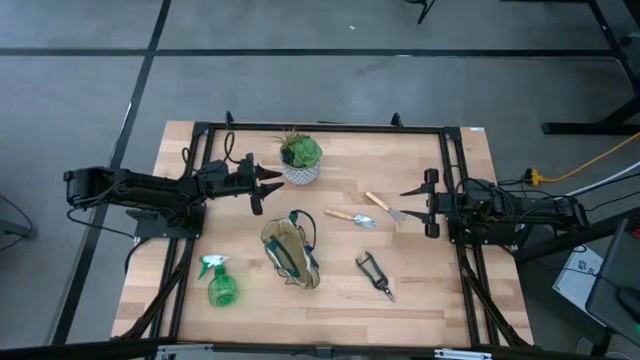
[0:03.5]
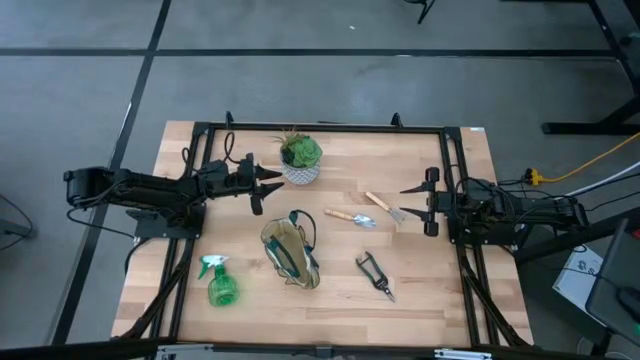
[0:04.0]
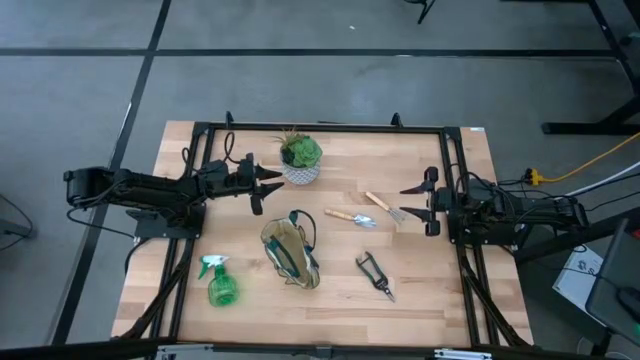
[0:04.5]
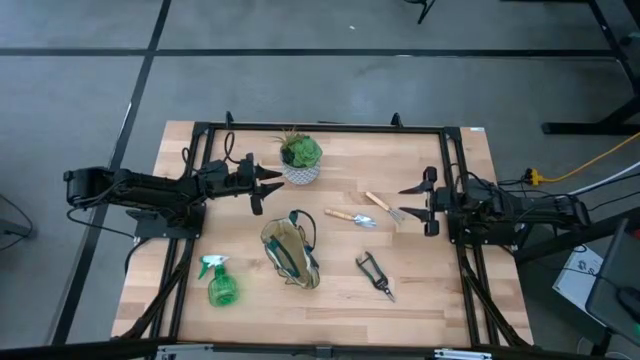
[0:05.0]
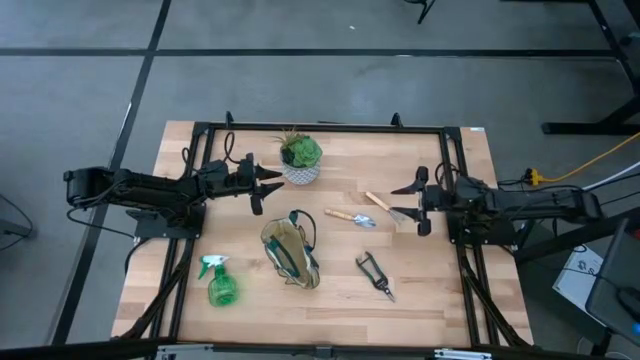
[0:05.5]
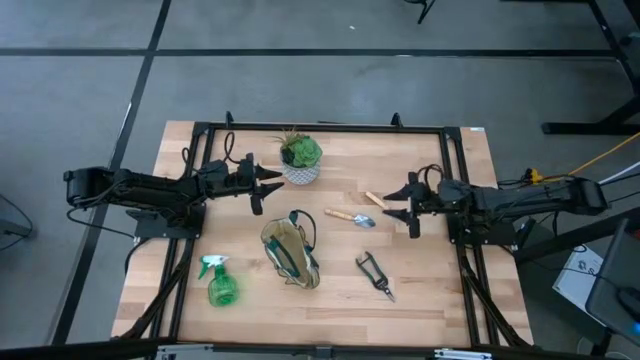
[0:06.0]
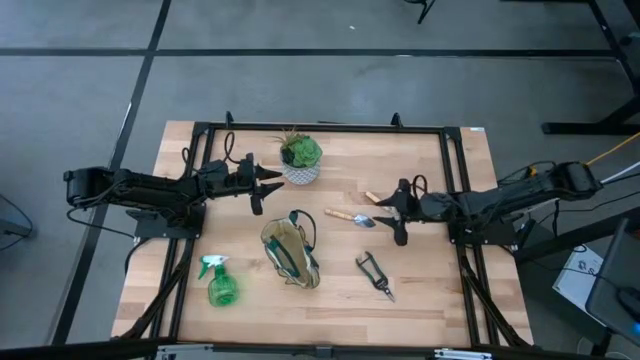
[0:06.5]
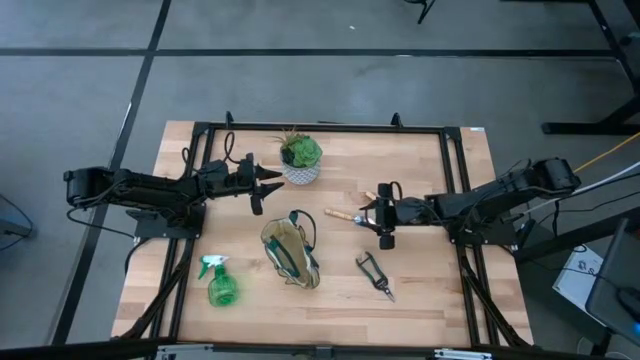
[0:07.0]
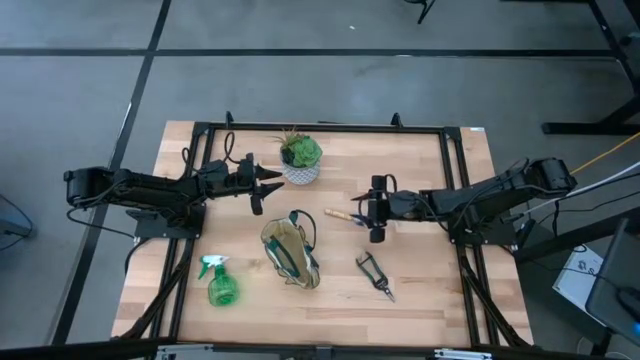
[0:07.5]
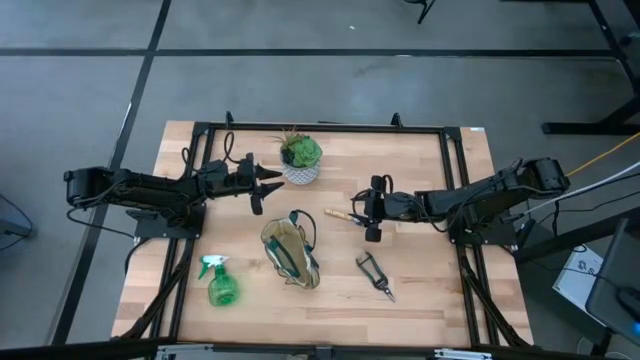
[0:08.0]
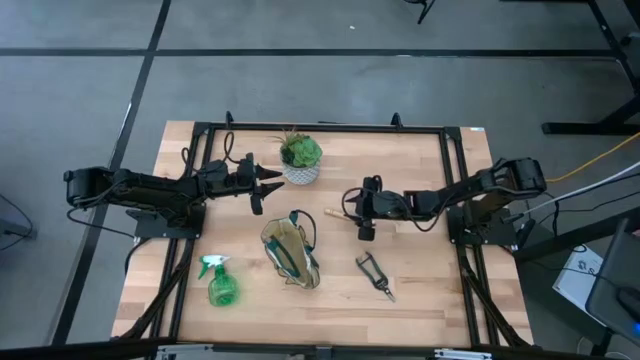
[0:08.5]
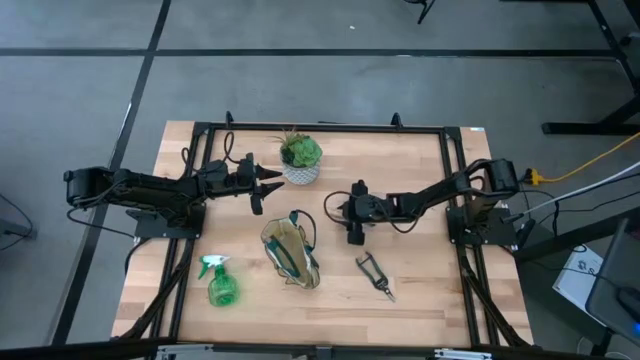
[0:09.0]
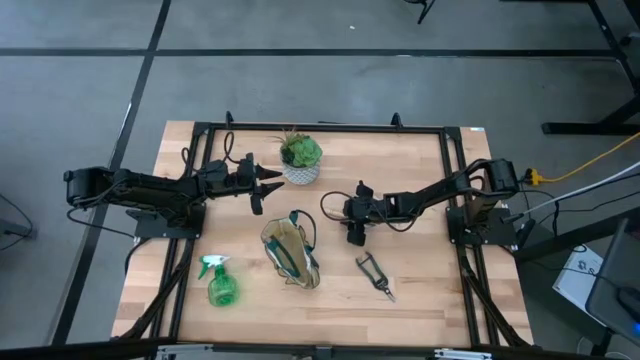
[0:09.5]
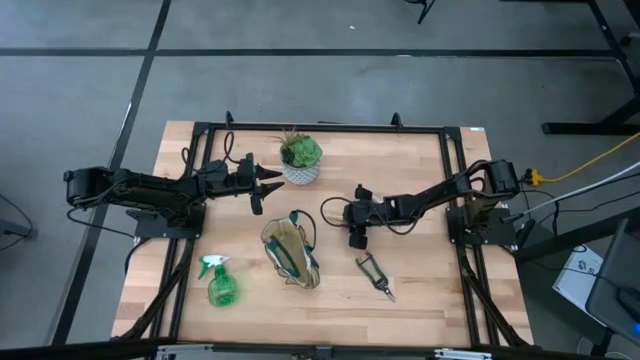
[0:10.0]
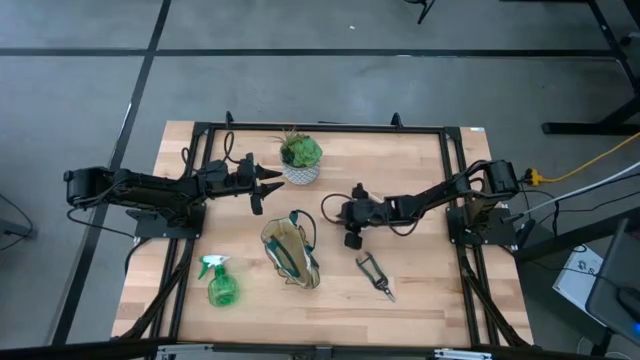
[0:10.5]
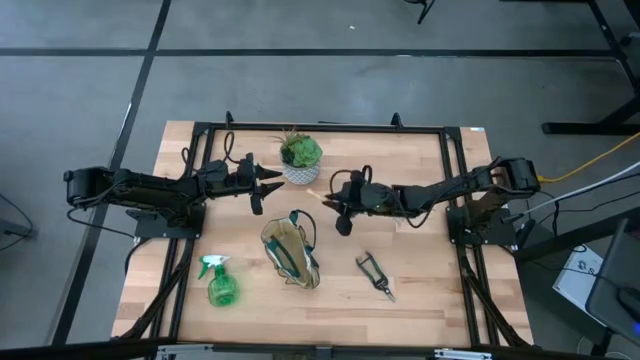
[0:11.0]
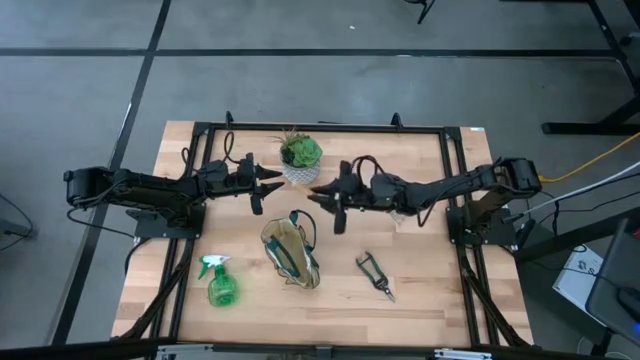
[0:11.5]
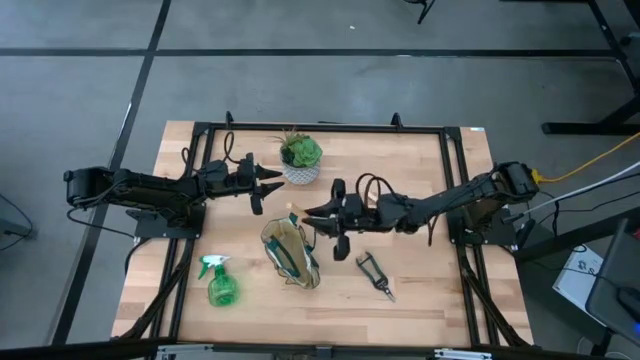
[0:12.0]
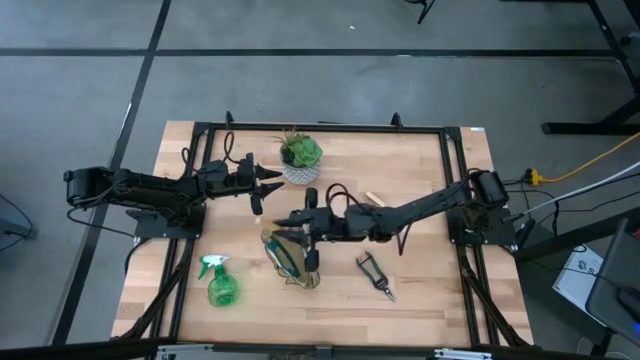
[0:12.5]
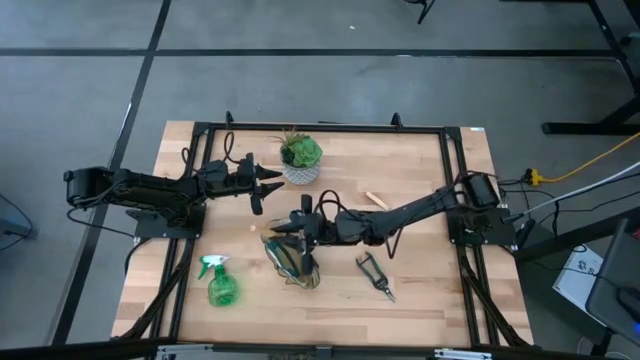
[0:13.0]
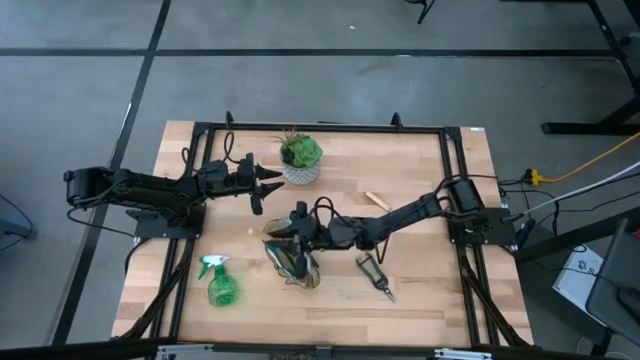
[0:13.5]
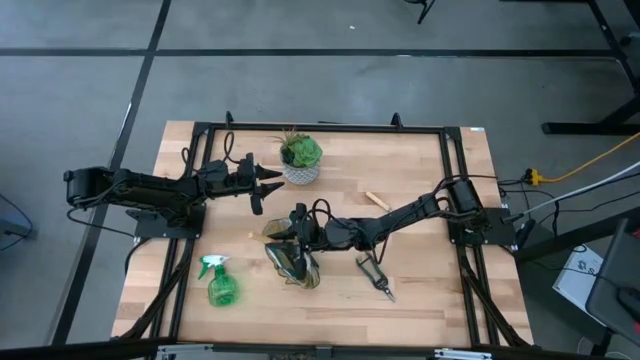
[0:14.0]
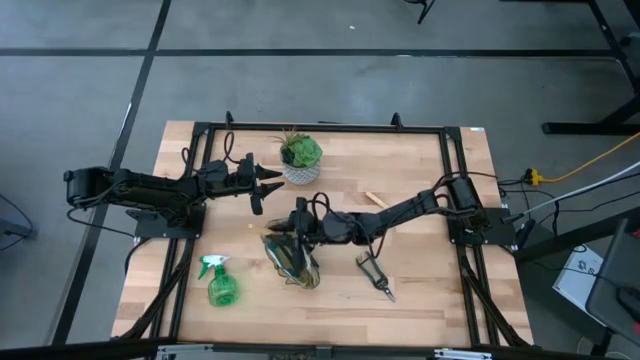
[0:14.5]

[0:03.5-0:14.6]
Task: Pick & Place Garden tools in Gardening bag
Put the trowel into the gardening bag

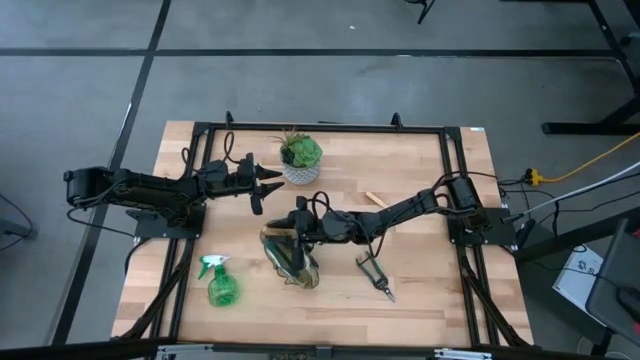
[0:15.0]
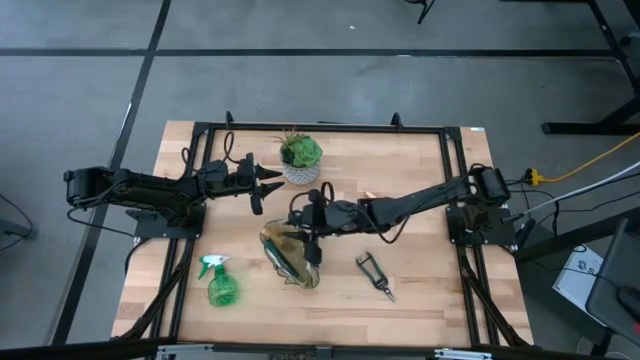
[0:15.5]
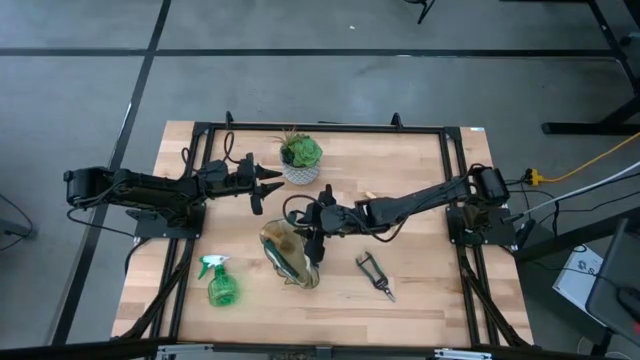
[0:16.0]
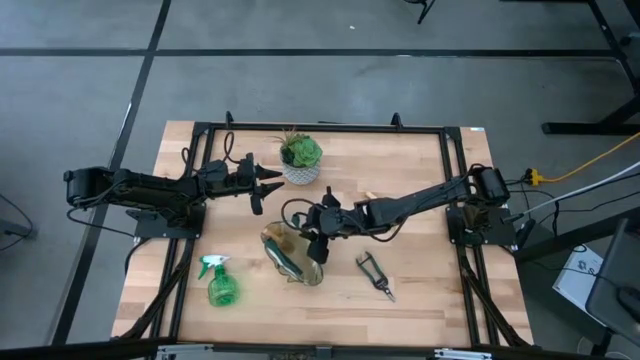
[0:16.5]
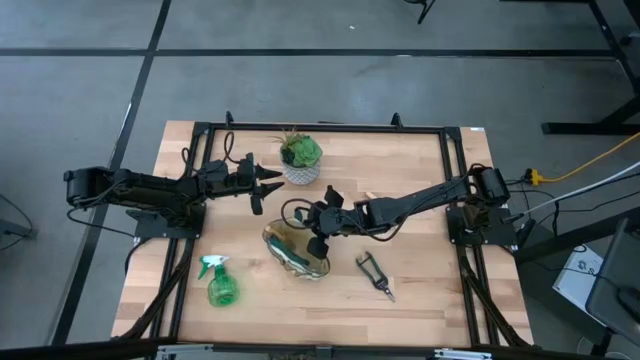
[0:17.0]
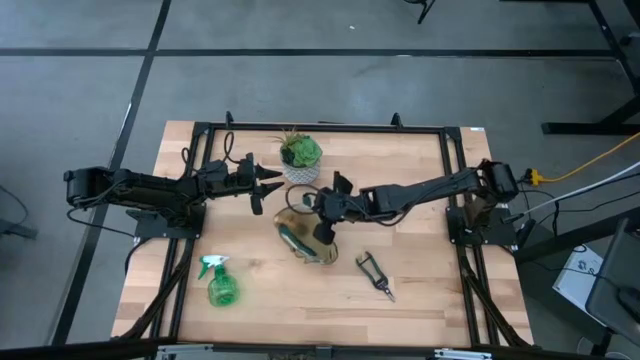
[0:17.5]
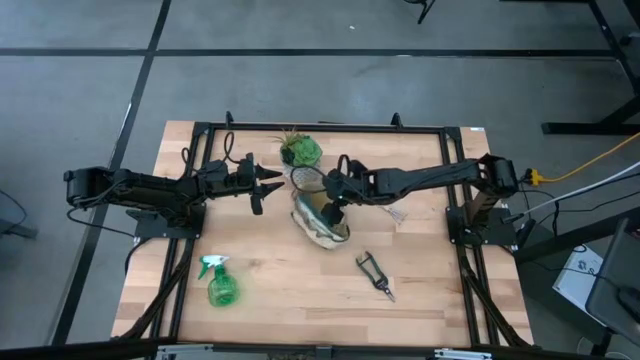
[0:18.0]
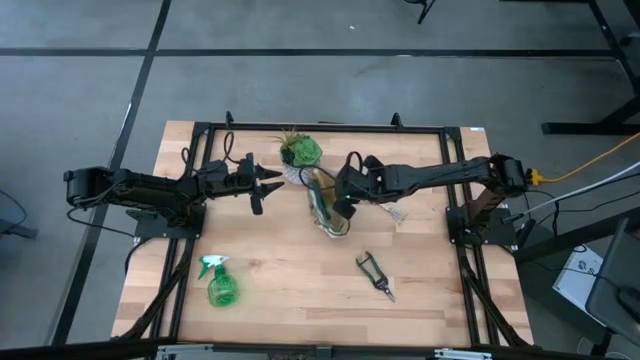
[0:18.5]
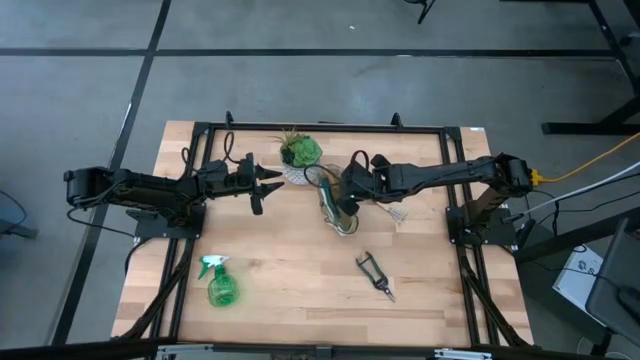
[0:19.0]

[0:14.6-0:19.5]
Move the gardening bag to the center of the table

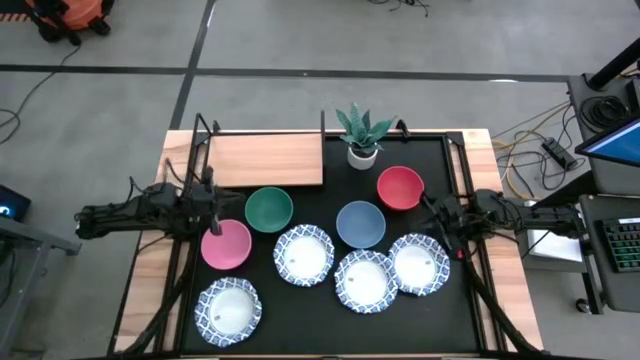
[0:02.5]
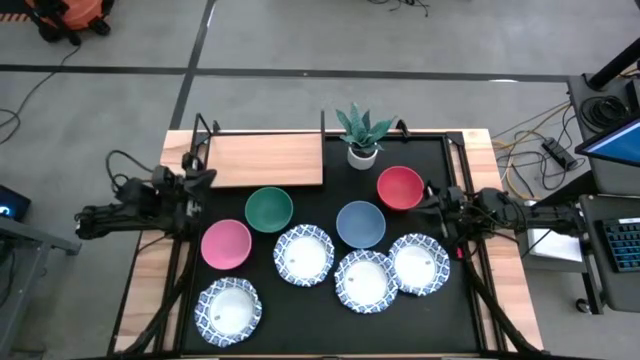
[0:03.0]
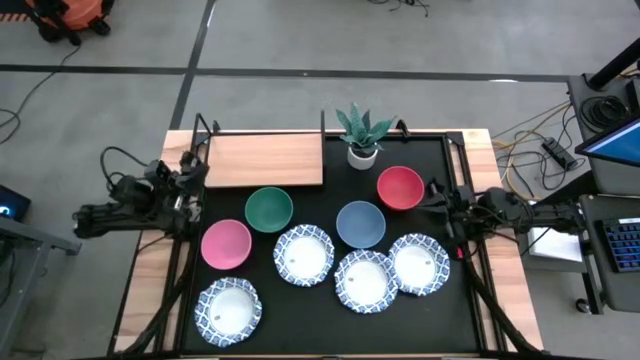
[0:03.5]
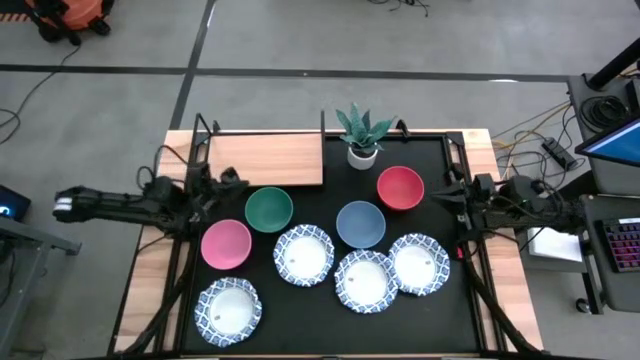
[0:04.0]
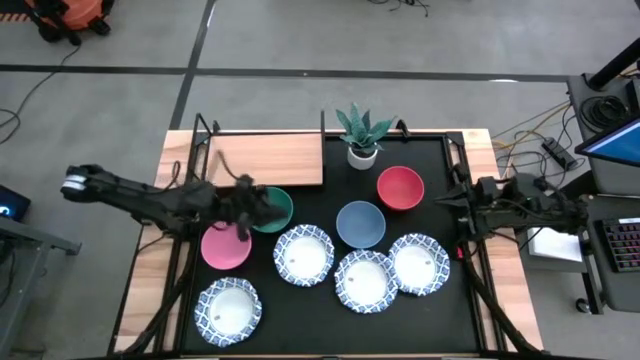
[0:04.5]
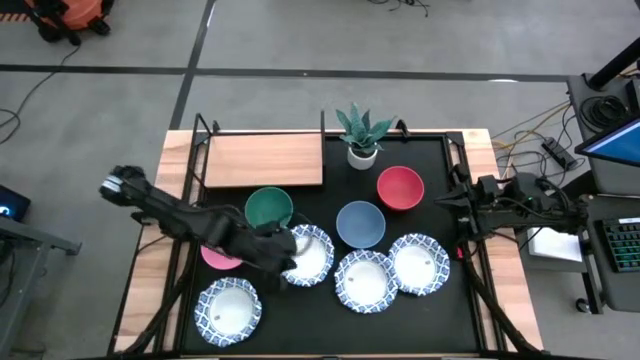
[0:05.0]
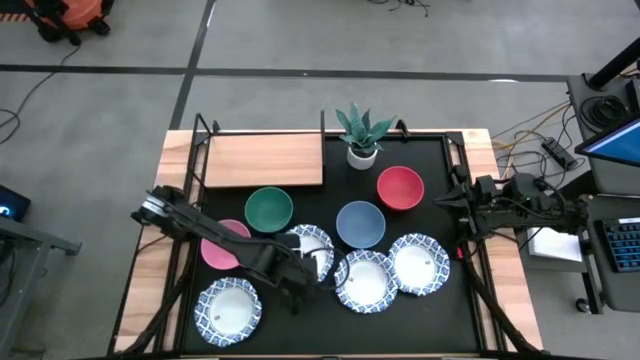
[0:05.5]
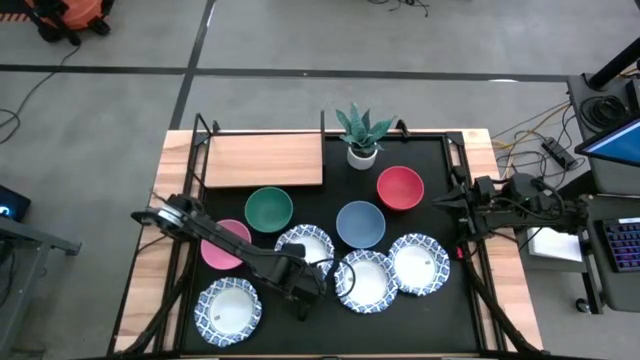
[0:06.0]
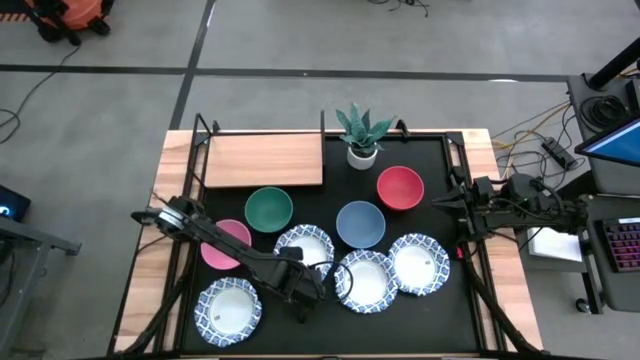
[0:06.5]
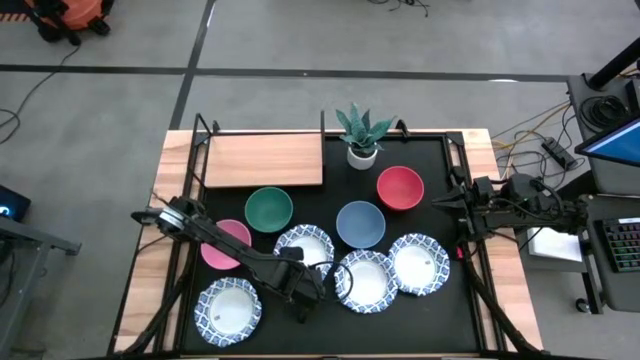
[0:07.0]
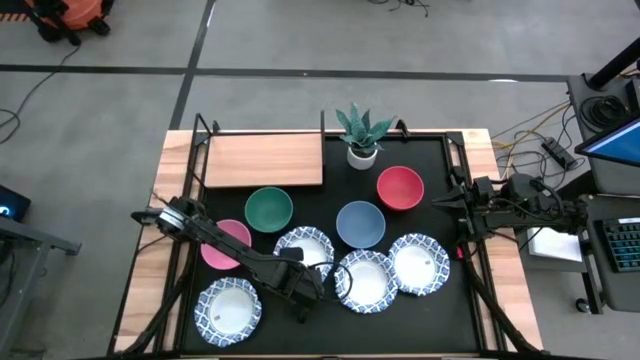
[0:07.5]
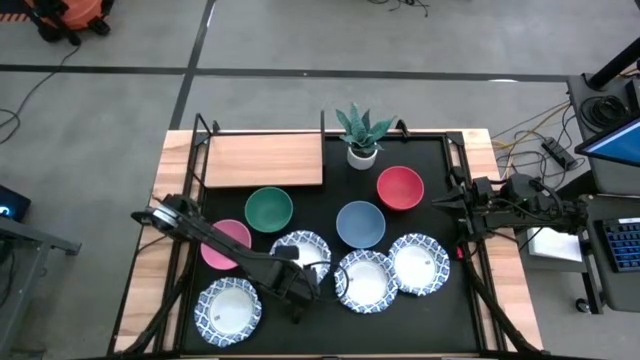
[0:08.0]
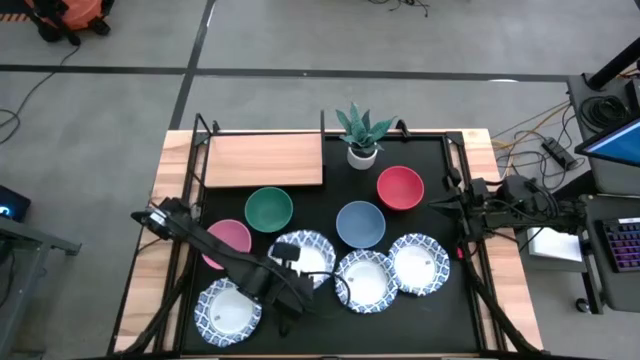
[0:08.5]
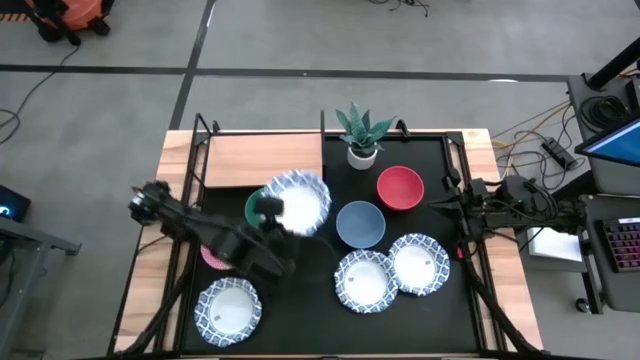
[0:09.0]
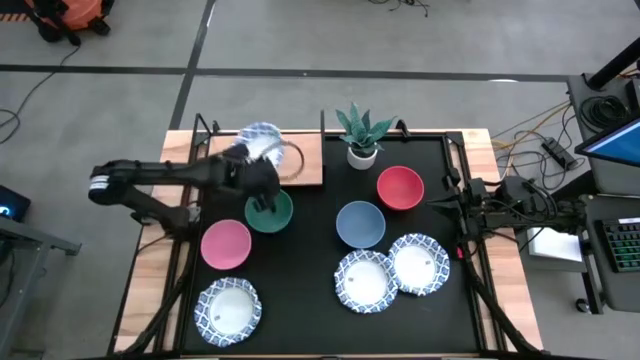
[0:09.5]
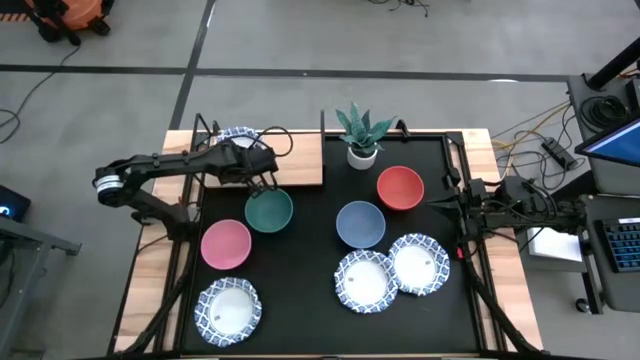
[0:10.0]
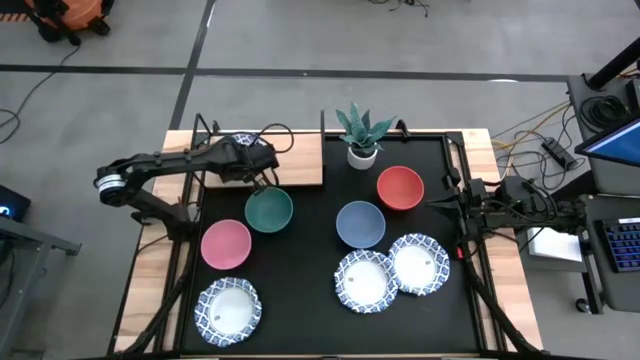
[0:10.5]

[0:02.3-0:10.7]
Task: Place and stack bowls onto a shelf
Put the white patterned bowl on the shelf
